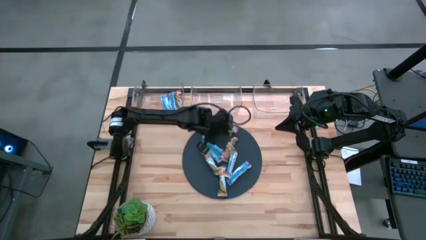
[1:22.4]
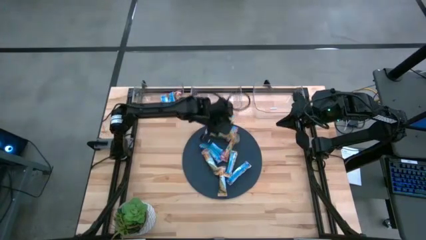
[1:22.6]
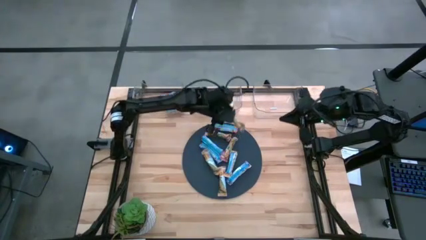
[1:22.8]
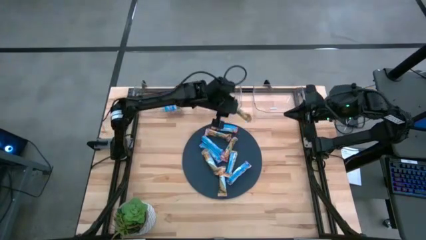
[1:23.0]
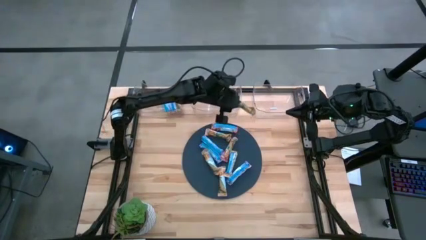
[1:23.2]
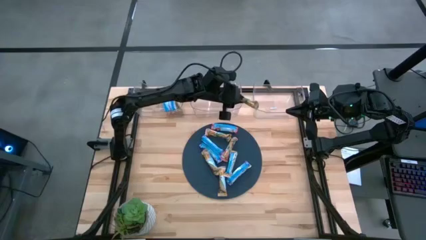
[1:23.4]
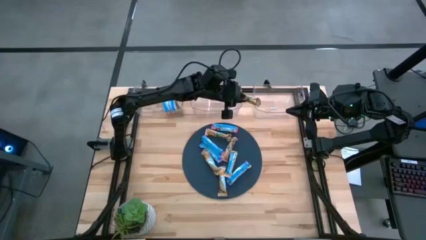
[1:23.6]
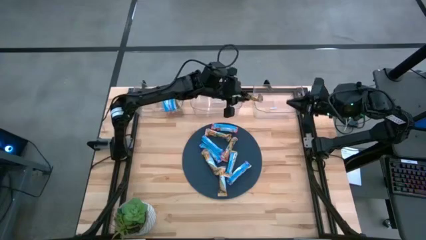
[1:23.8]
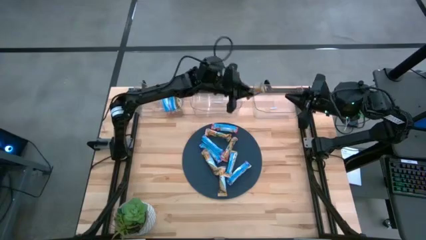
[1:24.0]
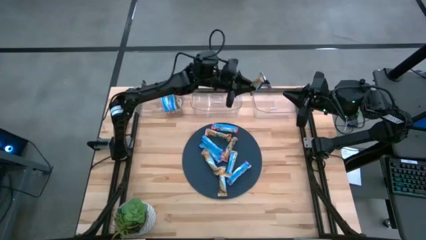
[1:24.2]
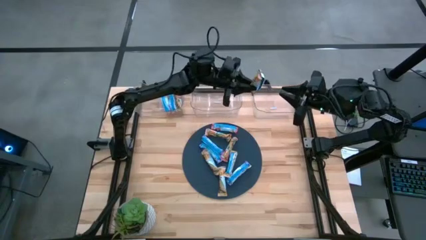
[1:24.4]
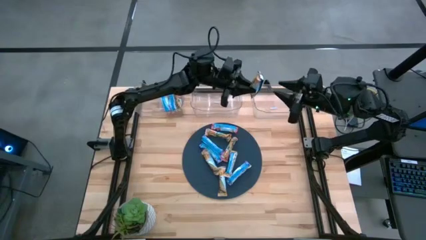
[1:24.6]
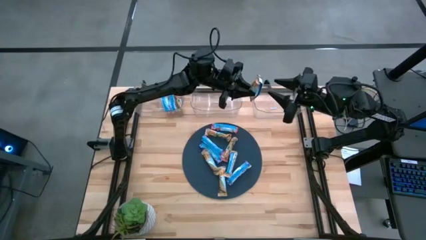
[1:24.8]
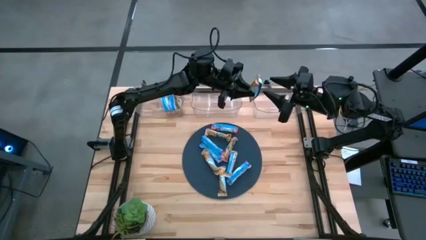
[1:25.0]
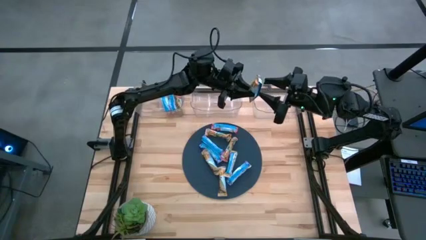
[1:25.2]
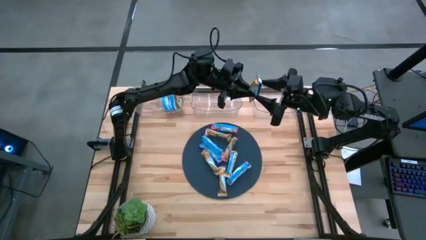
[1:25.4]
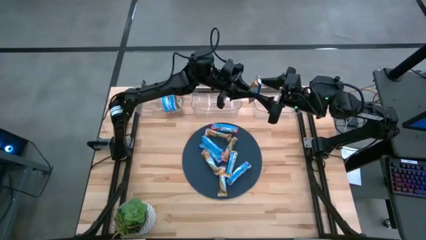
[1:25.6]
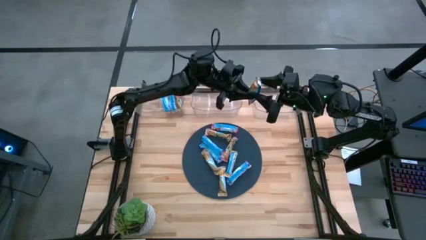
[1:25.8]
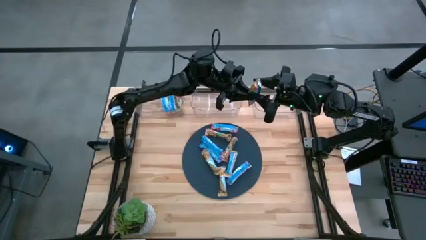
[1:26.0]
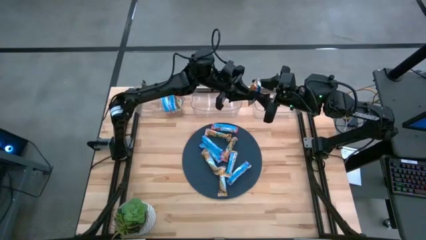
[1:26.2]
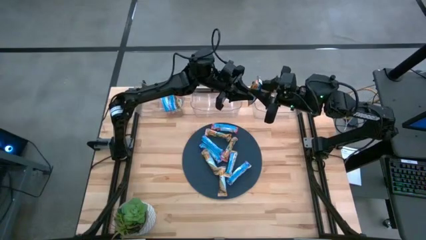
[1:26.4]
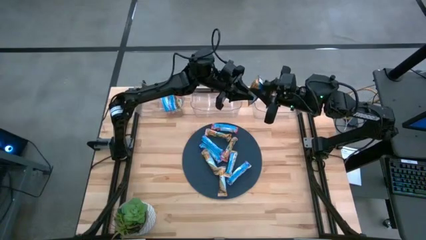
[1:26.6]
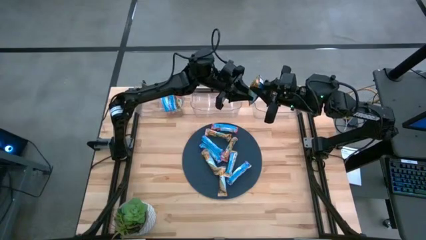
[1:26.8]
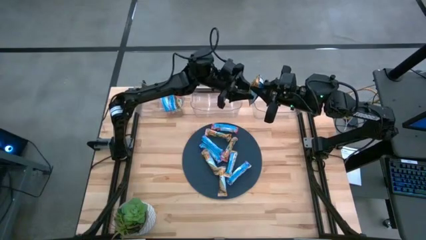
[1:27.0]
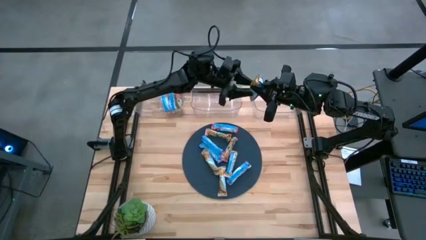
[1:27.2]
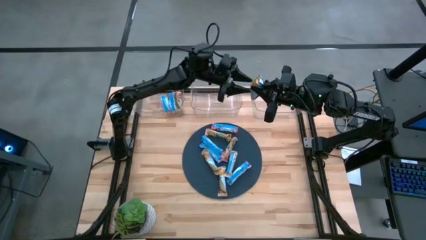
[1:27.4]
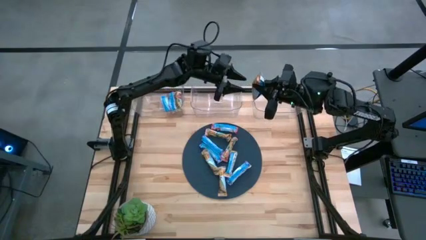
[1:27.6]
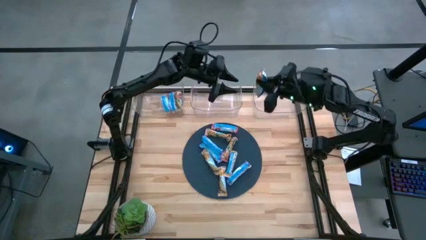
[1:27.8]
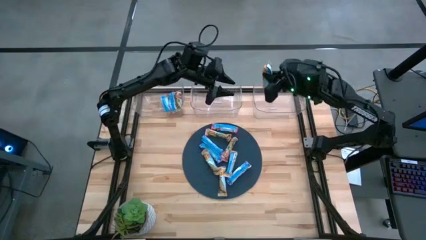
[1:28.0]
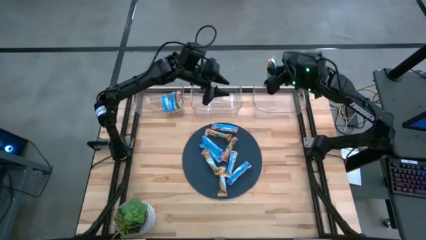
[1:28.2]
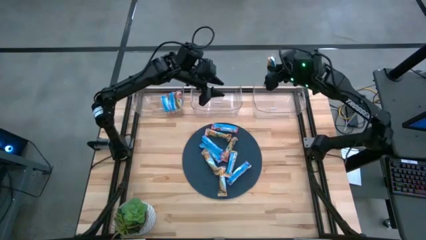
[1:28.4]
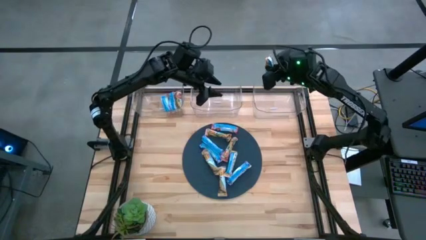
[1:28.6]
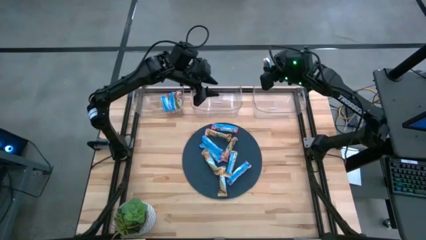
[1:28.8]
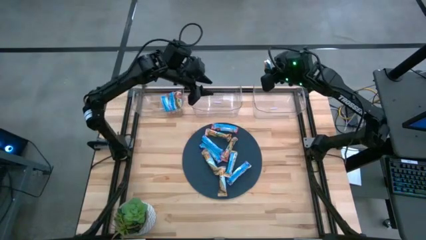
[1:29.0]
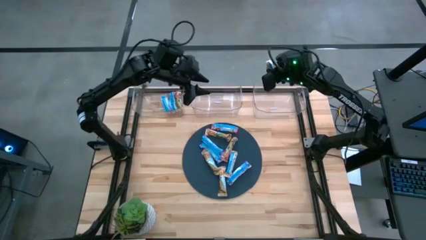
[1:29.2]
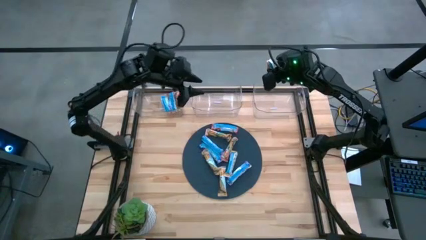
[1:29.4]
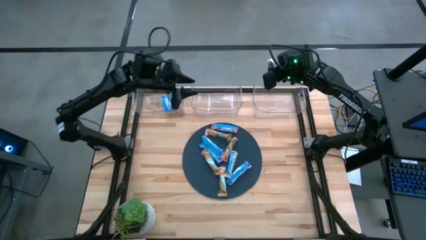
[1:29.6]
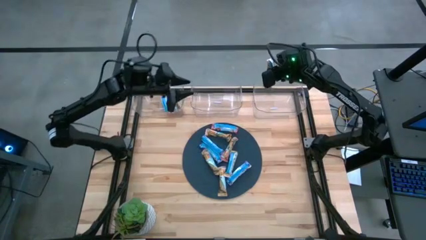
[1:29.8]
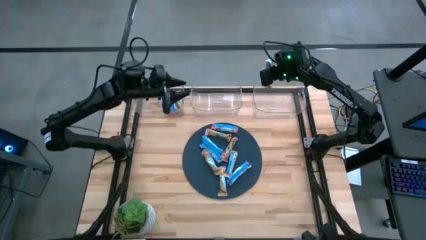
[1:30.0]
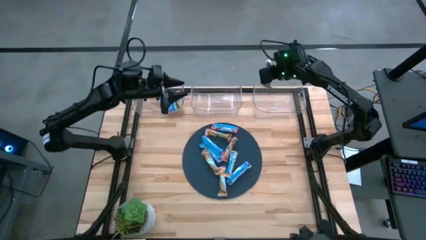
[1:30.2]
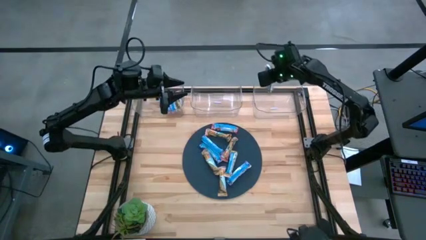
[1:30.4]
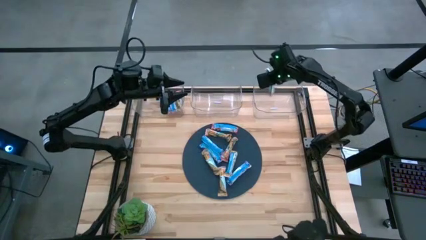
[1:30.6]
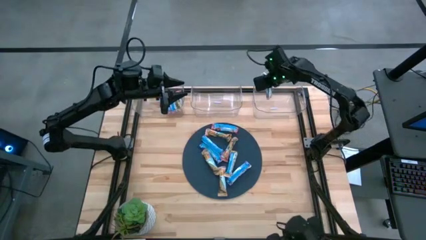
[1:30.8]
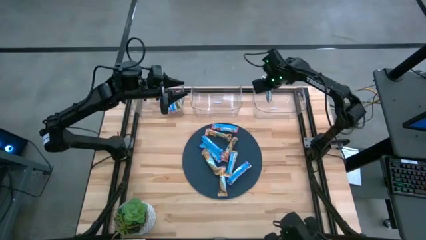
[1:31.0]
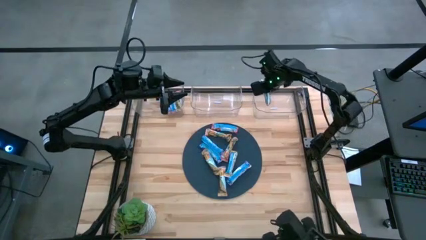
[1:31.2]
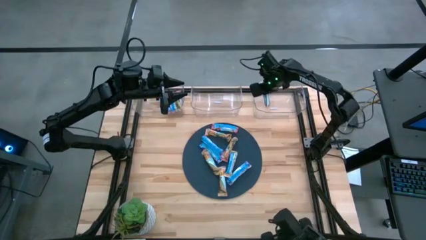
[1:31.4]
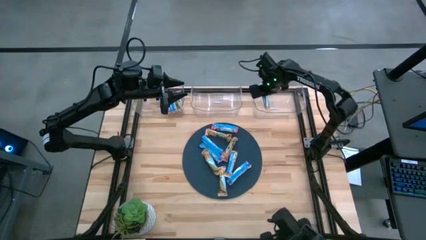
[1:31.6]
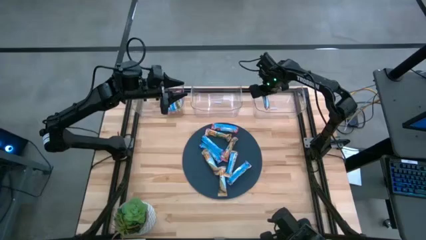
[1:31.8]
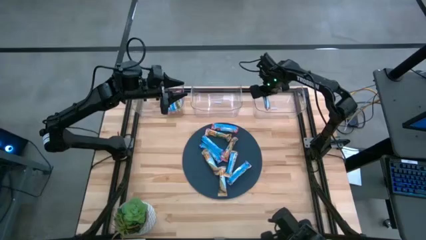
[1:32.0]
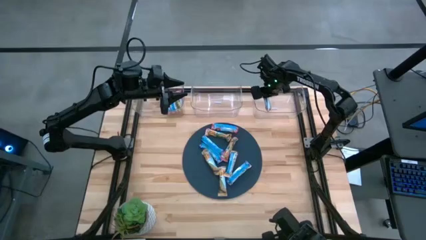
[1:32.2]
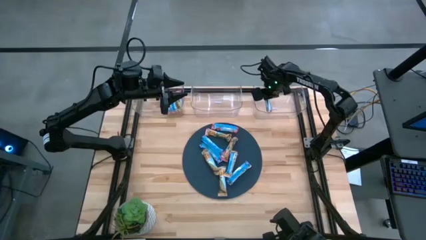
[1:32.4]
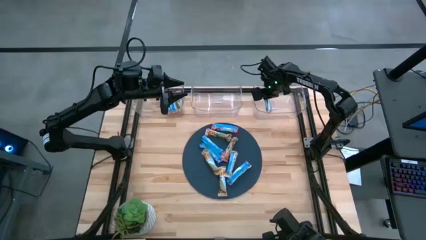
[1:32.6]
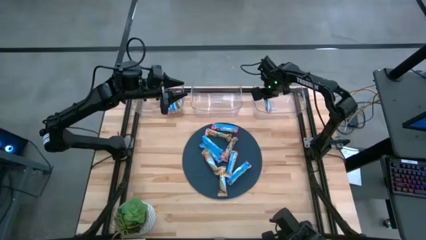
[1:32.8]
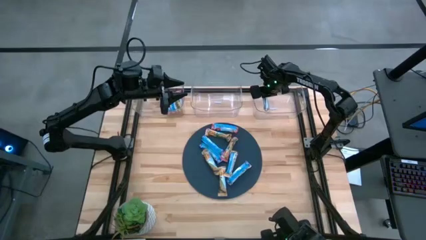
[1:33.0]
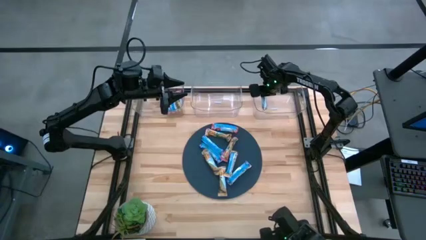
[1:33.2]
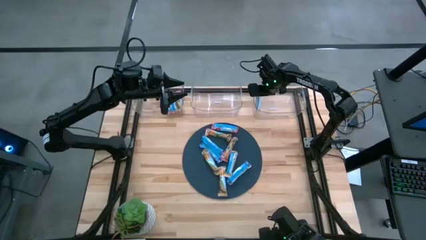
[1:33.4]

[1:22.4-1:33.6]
Task: Pick and place Granola Bars by type
Put the yellow granola bar into the right transparent bin

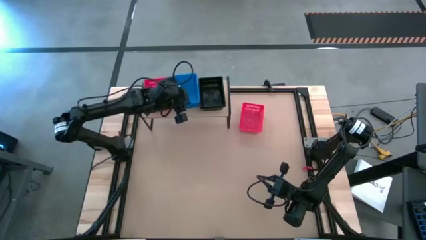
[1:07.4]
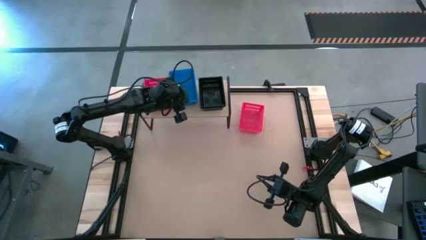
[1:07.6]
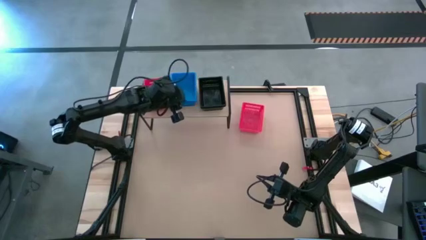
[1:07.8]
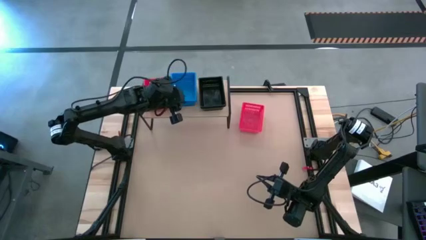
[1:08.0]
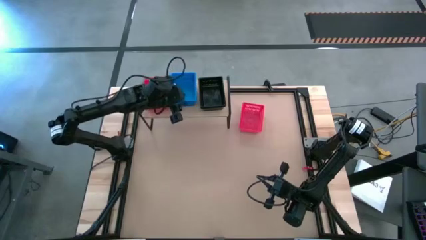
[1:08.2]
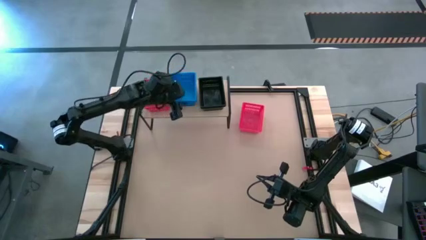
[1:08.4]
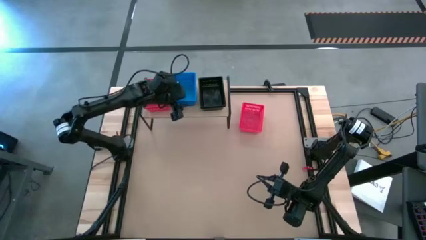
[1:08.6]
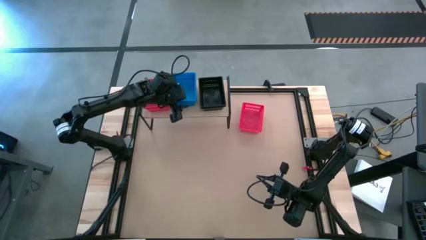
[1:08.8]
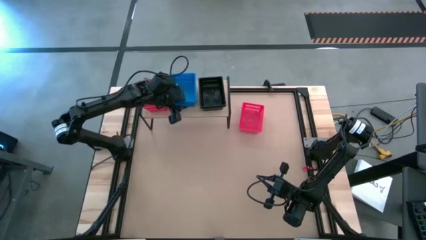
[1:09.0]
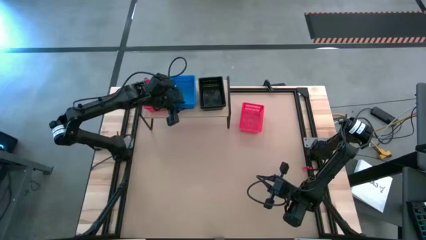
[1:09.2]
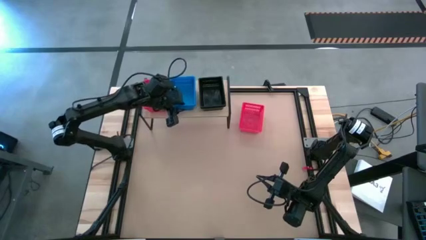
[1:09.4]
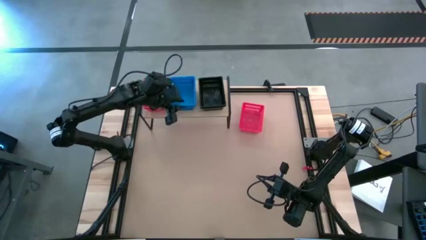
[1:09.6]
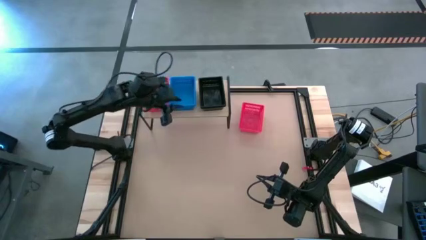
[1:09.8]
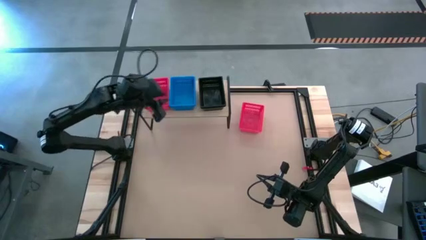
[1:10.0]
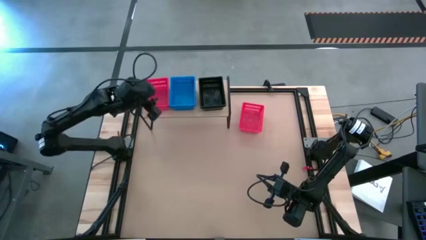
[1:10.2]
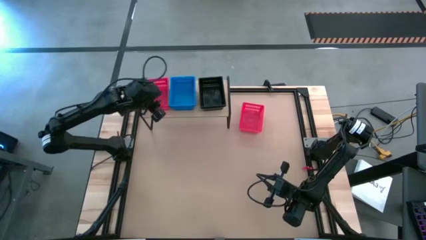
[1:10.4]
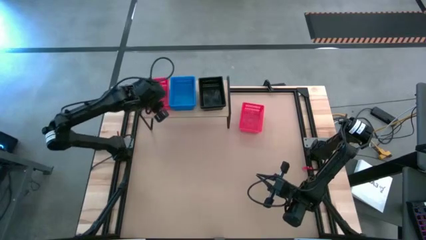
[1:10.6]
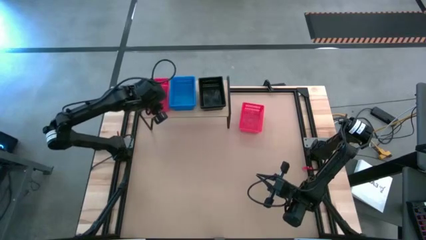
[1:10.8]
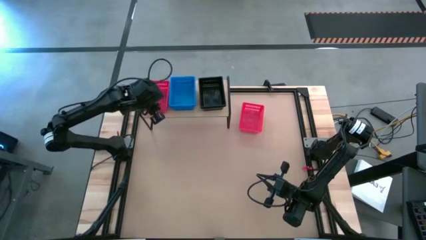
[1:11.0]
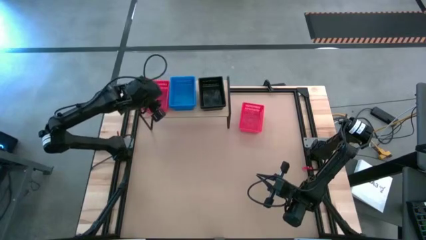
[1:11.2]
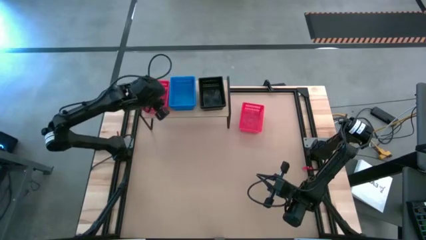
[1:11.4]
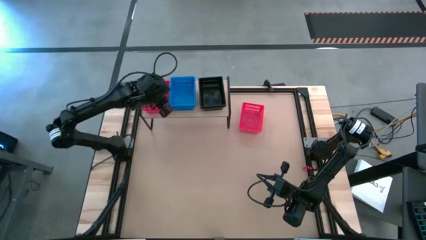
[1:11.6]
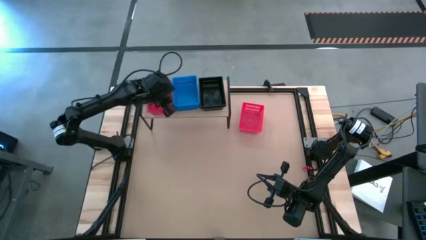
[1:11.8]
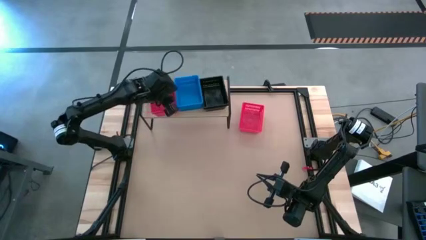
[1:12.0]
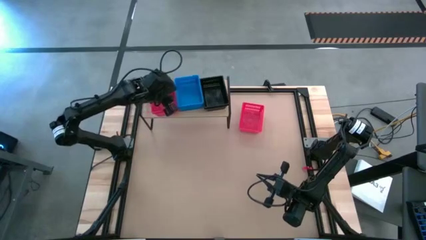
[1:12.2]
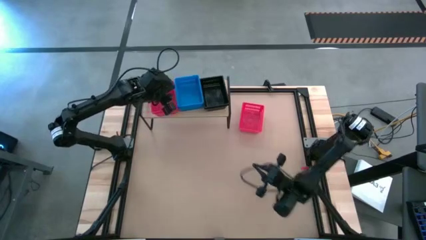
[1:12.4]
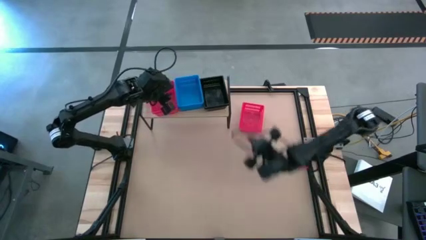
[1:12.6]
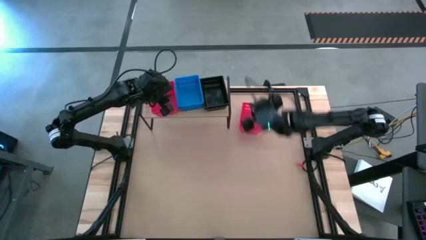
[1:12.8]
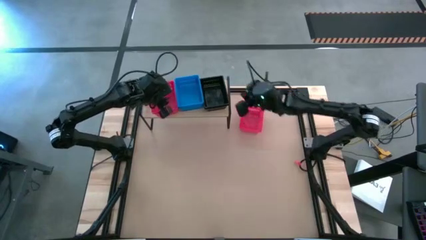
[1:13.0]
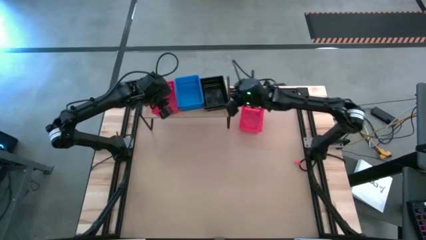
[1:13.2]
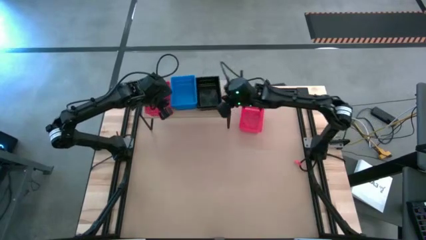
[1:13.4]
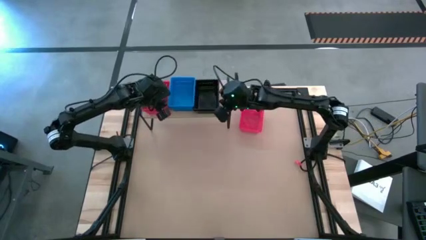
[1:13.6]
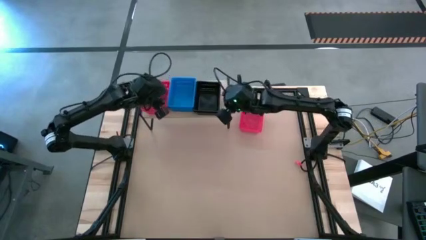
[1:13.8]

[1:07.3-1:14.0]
Task: Stack baskets on shelf by color
Adjust the bins on the shelf
